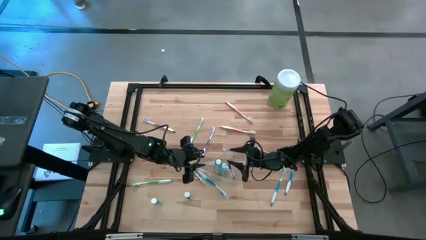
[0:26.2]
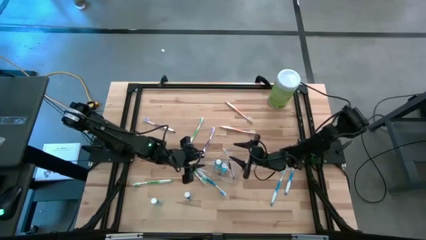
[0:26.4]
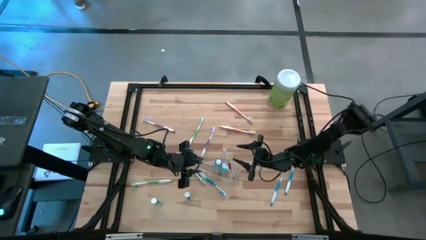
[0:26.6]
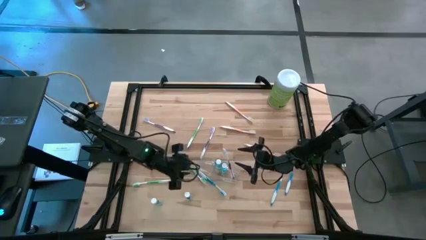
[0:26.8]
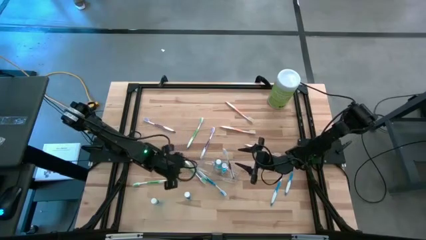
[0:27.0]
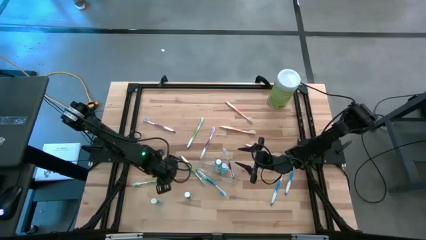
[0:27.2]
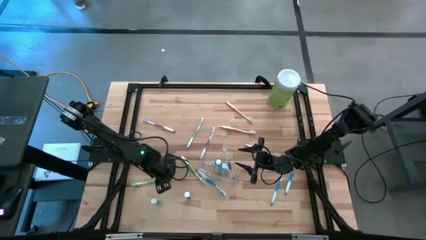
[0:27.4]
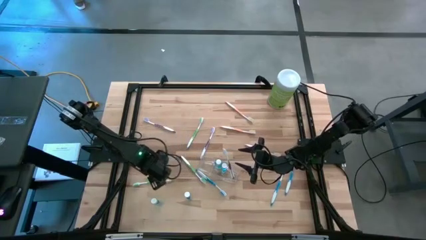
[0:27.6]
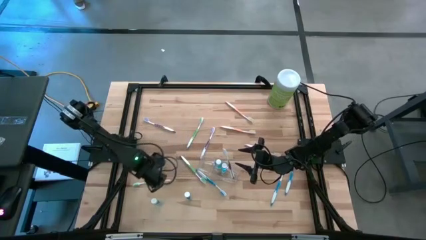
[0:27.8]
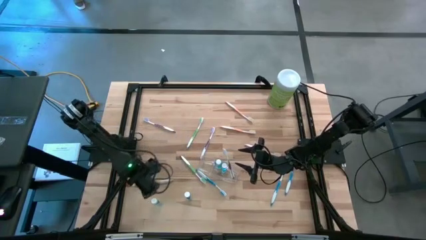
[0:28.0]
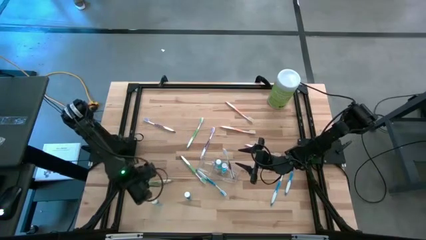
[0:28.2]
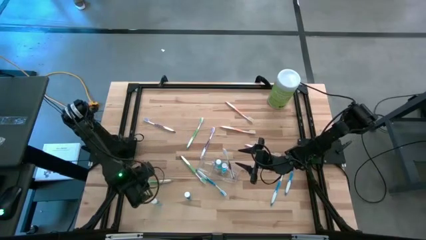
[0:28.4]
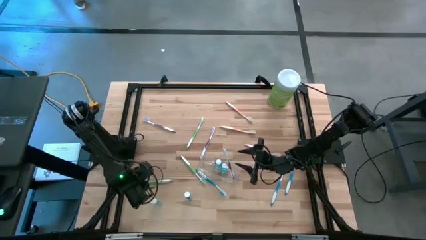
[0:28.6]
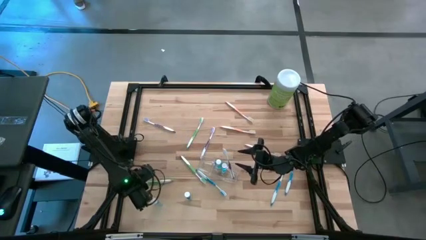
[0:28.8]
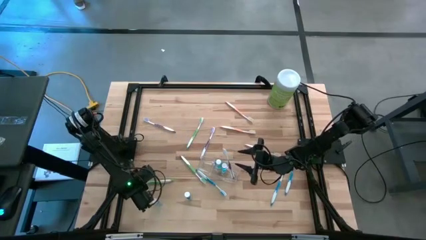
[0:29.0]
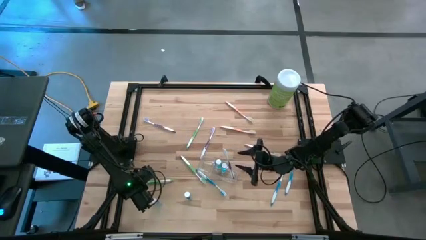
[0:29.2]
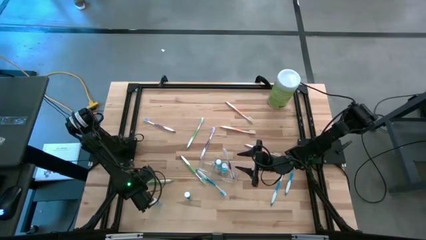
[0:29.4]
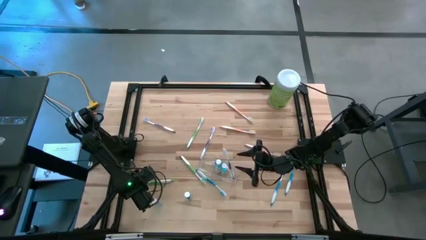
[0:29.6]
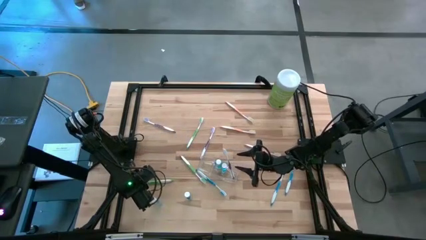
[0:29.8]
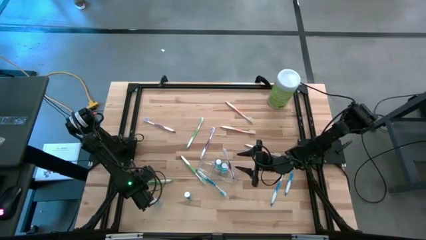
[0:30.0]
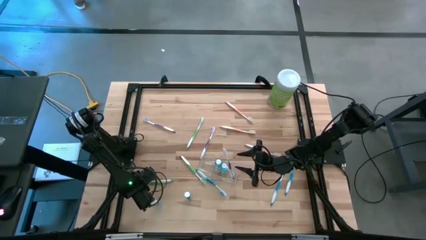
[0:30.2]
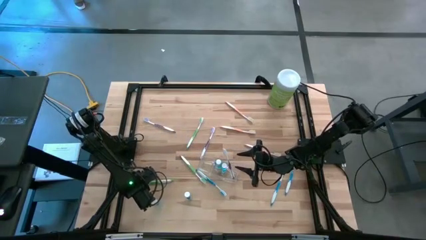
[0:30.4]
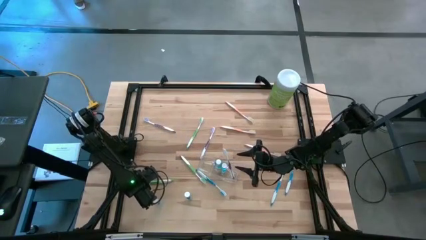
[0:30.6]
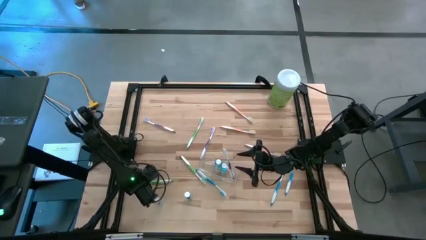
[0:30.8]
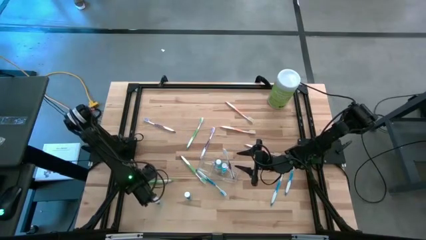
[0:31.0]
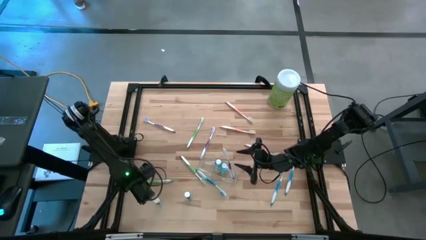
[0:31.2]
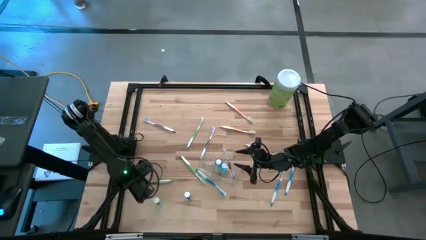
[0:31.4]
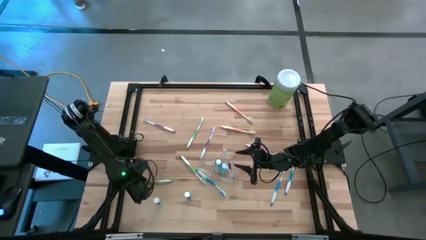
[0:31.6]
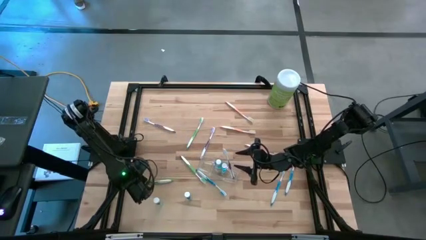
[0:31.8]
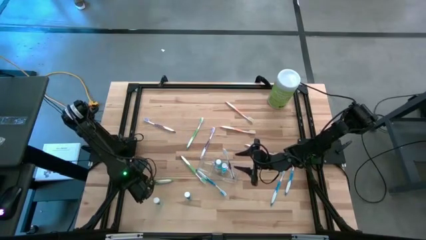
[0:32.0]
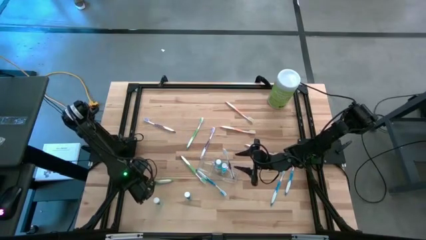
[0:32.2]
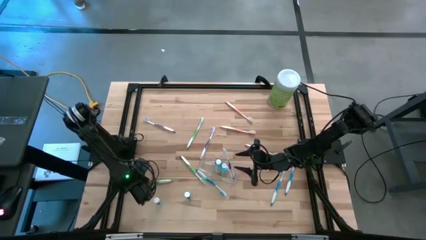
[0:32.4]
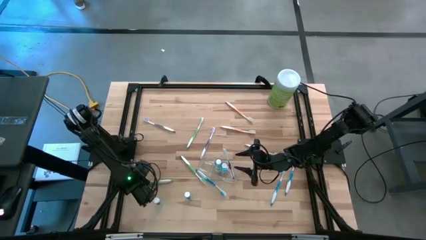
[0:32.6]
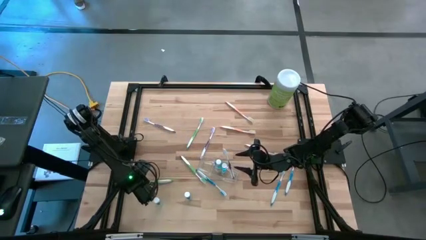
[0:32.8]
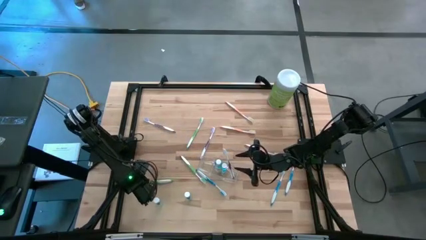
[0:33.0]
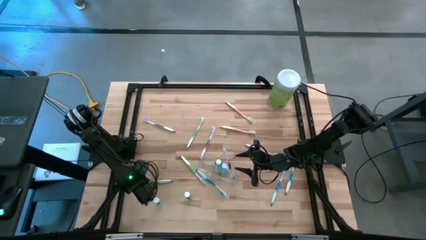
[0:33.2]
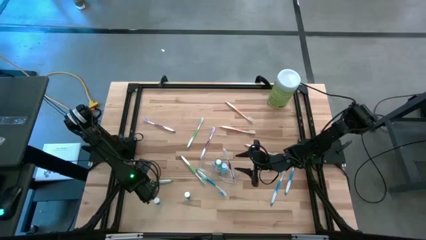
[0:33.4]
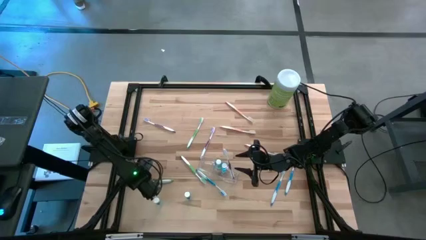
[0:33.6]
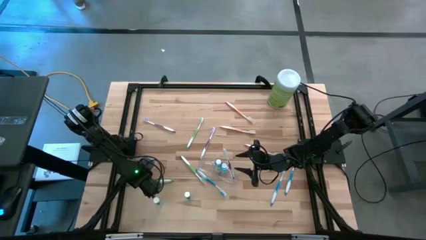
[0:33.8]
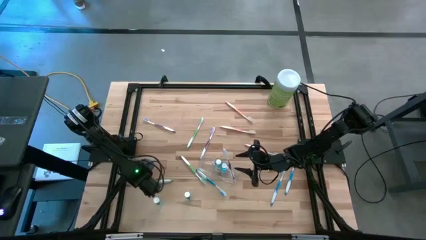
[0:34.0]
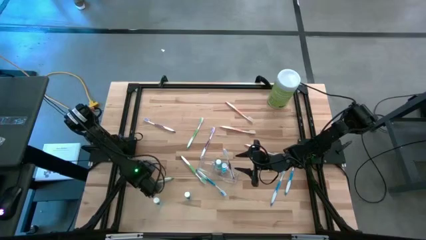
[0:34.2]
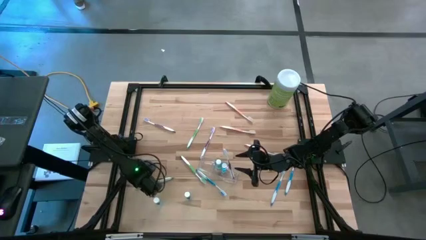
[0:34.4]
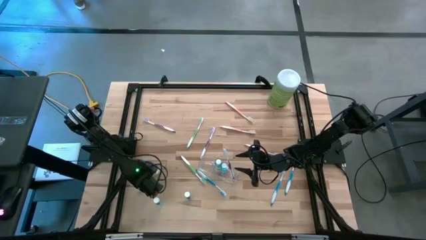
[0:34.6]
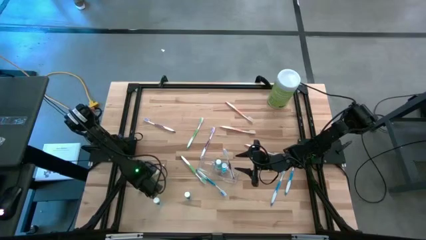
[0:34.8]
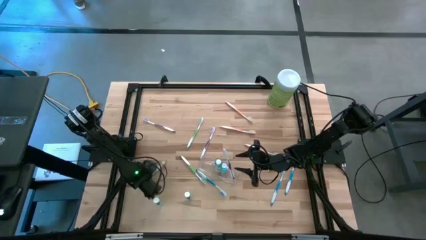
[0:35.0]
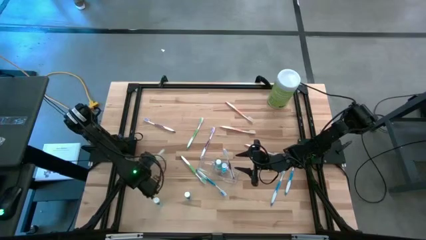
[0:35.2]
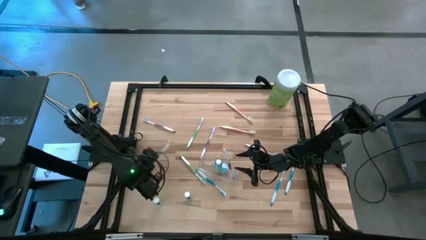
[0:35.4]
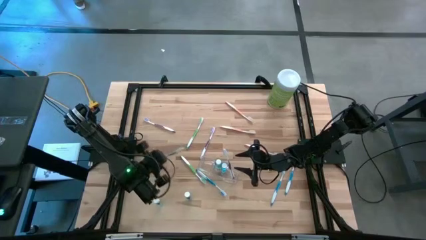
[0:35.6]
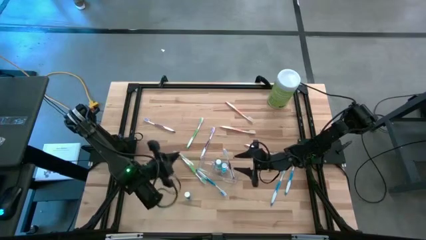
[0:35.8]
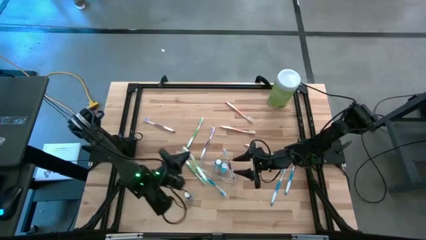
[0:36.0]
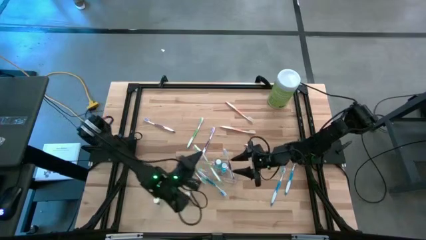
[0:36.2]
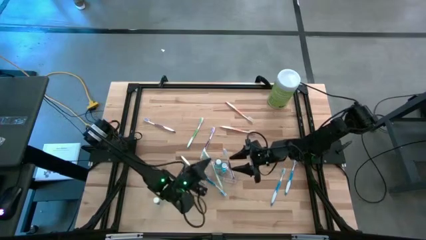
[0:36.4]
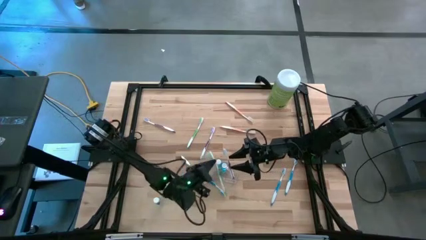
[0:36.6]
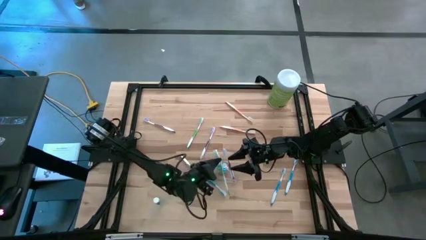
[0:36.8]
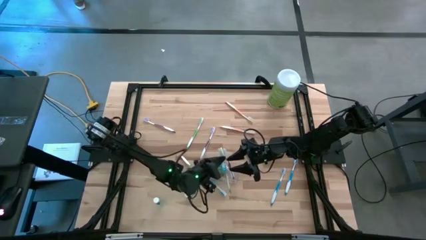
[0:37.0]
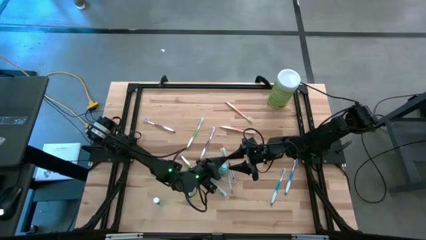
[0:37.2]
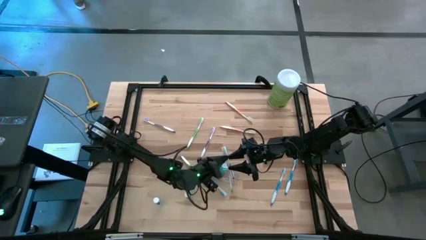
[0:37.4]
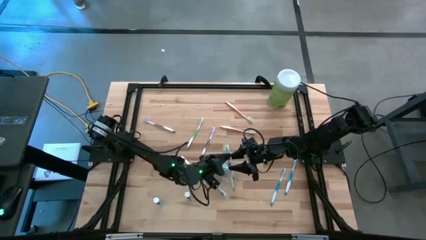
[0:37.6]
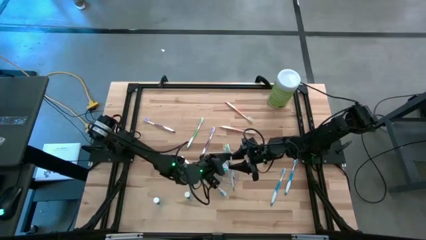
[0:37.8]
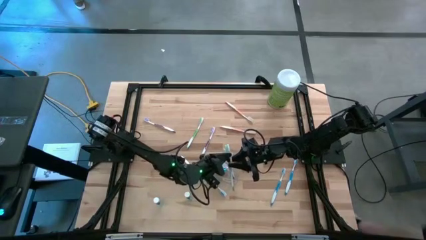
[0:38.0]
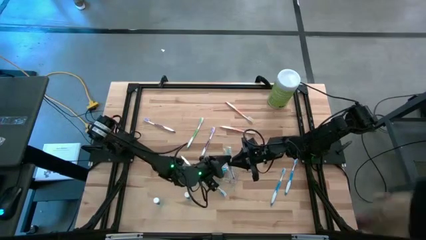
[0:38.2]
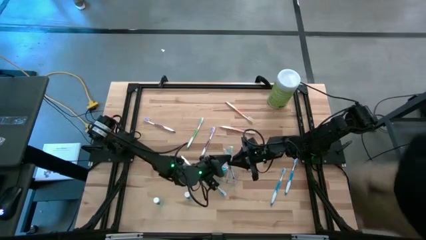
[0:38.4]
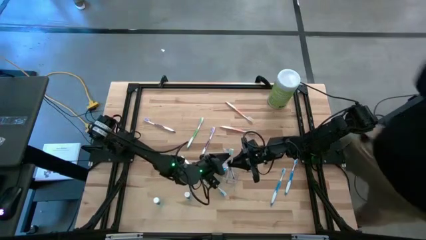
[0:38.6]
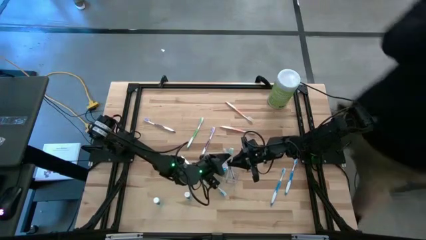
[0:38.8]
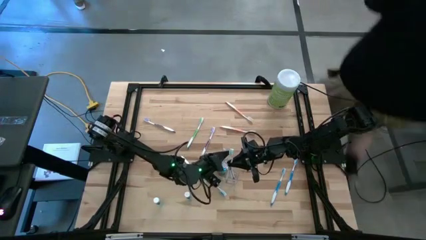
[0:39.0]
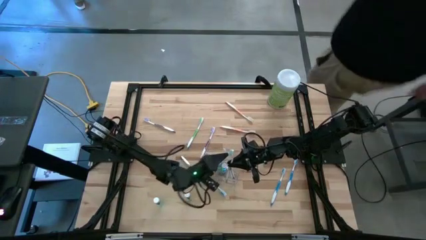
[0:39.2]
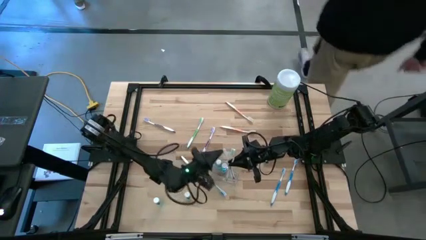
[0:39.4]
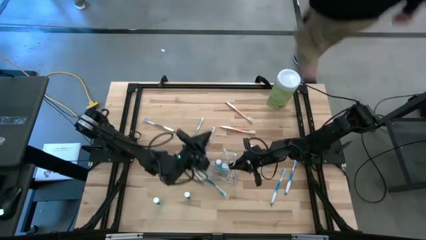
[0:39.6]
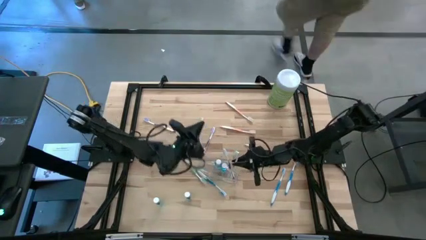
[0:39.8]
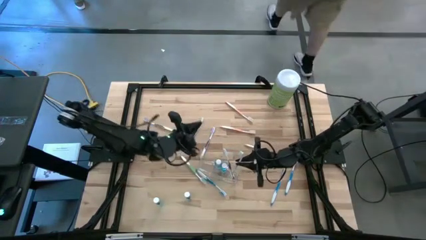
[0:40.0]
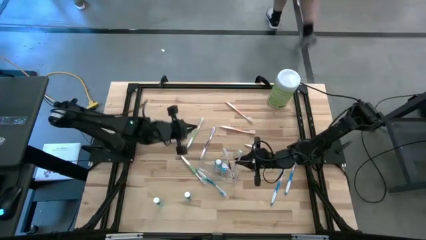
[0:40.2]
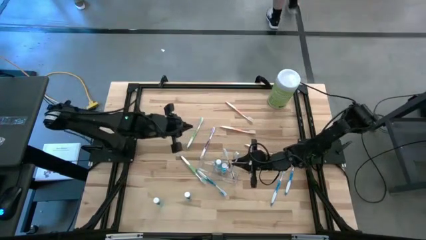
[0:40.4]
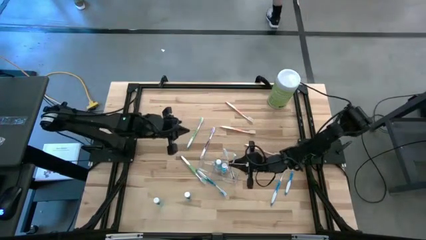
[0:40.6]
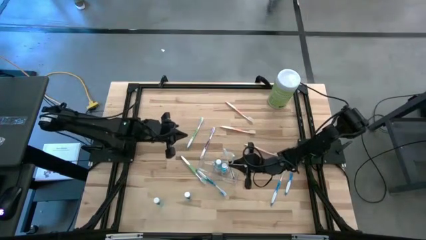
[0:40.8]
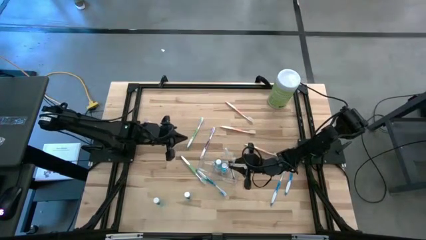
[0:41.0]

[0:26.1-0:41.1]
Task: Pick & Place toothbrushing station
Put the green toothbrush into the transparent organizer

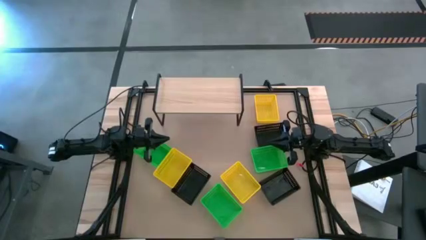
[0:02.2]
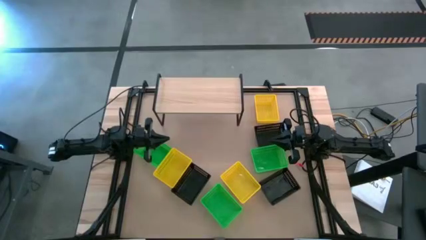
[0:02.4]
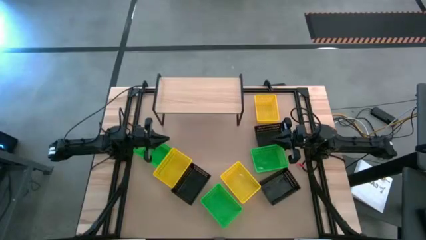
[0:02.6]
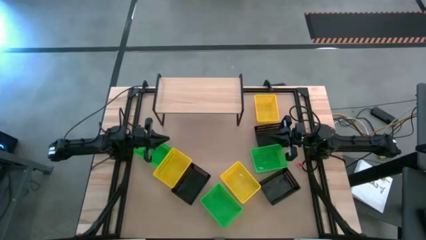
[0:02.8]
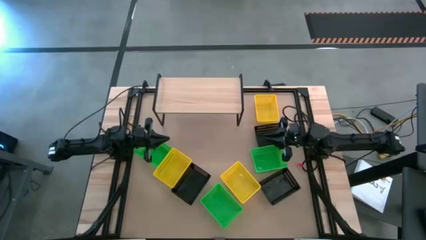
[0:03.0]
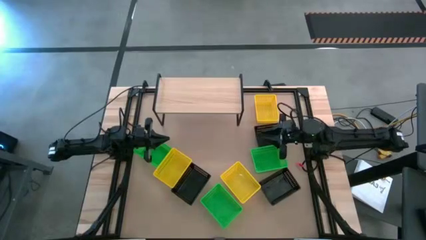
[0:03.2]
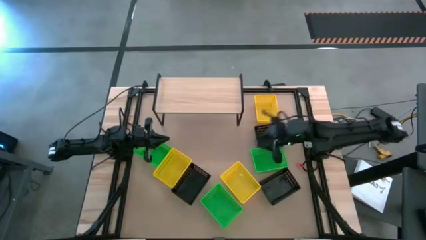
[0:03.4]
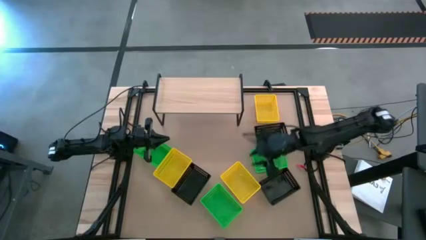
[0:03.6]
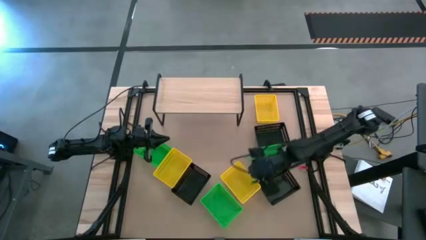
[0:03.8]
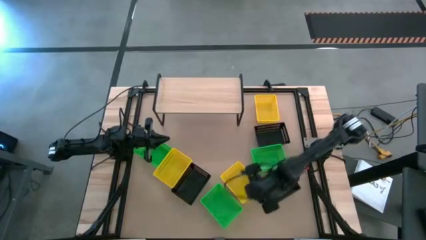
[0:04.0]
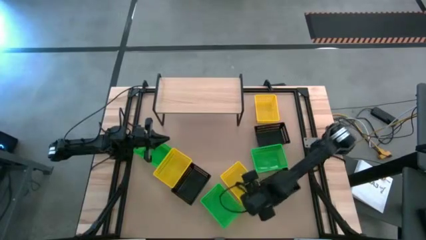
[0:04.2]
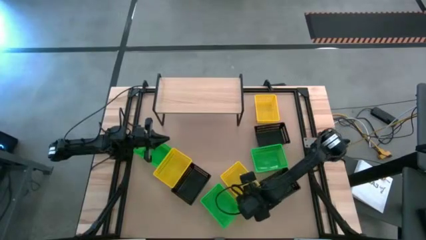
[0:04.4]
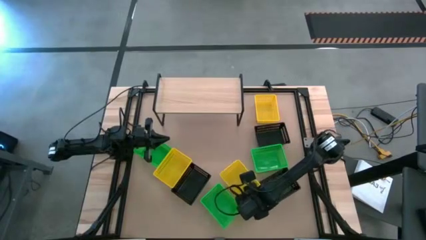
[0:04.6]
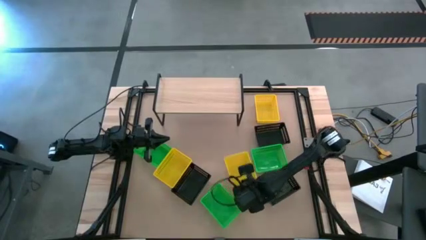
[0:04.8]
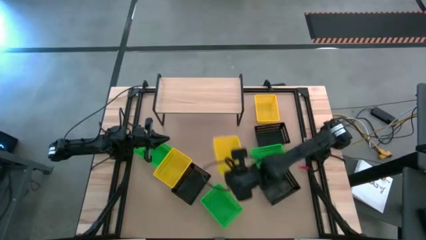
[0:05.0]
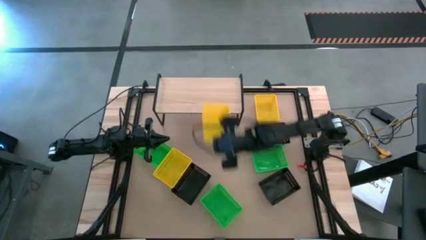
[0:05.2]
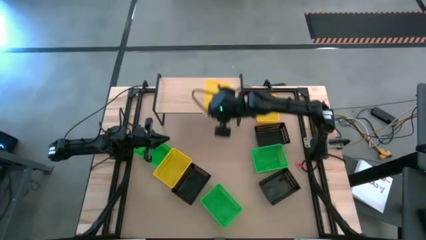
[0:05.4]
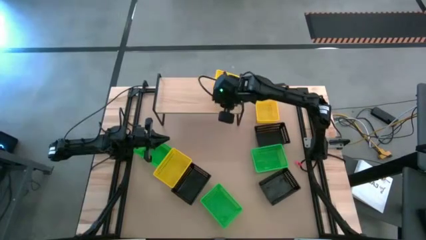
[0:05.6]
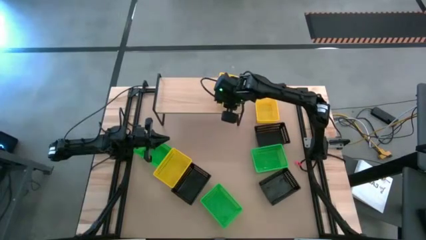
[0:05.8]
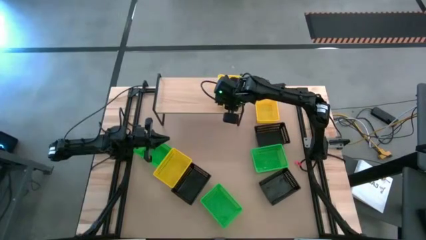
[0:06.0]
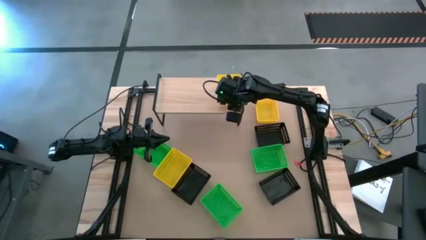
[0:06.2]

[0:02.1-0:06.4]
Task: Stack baskets on shelf by color
Put the bottom right yellow bin on the shelf
